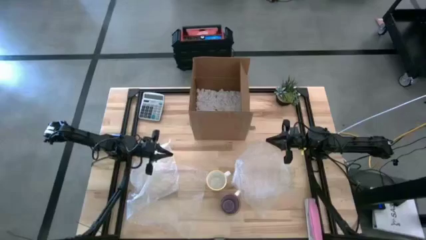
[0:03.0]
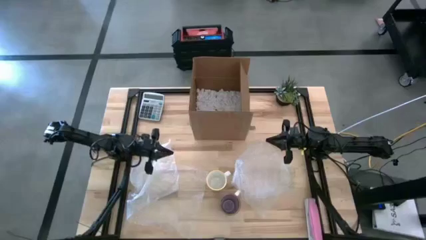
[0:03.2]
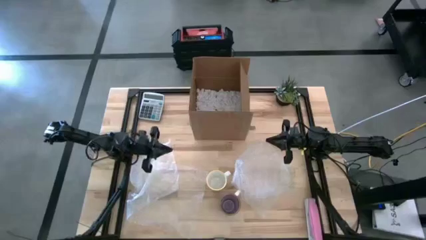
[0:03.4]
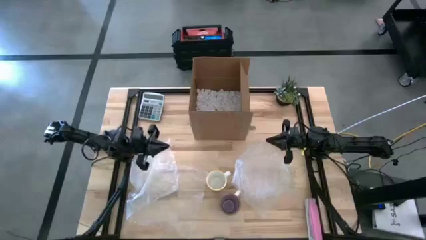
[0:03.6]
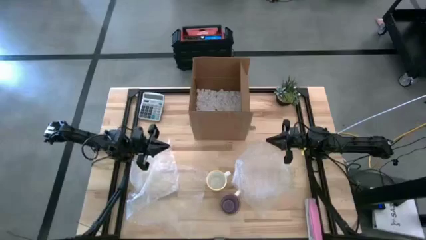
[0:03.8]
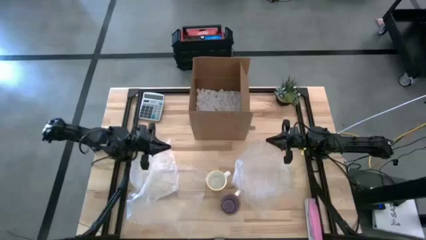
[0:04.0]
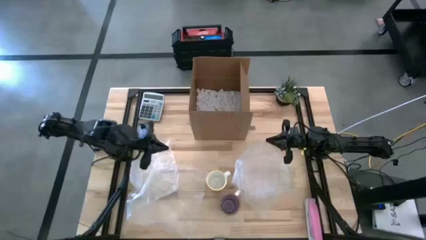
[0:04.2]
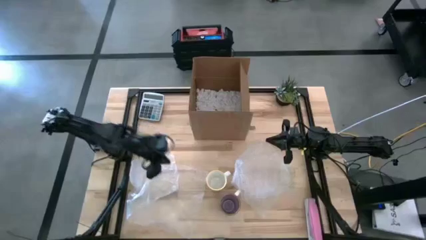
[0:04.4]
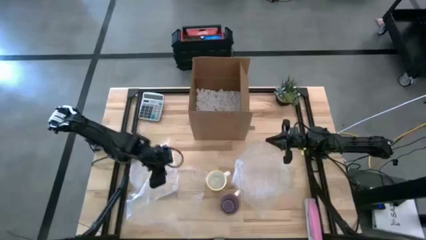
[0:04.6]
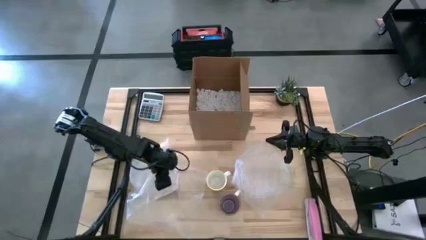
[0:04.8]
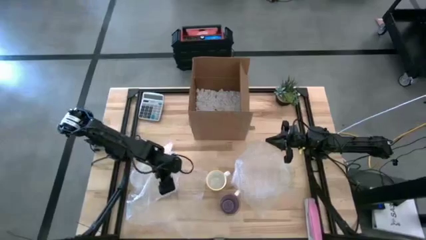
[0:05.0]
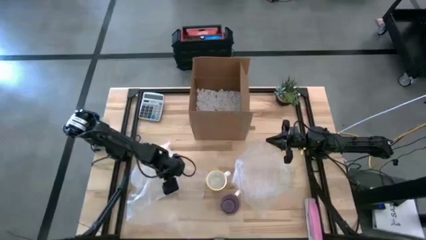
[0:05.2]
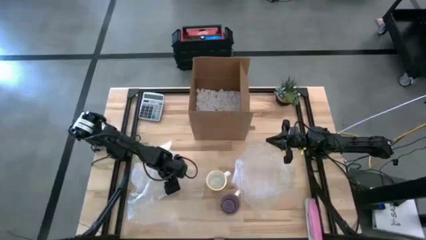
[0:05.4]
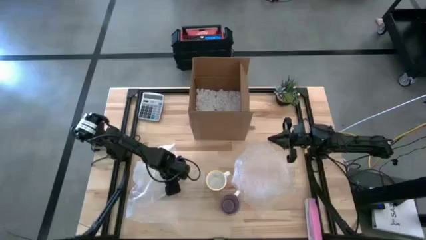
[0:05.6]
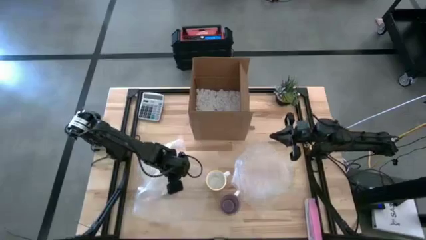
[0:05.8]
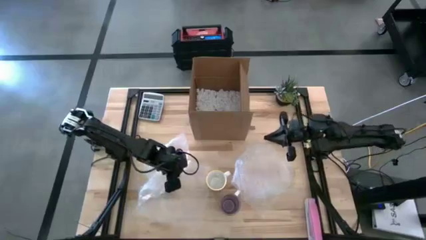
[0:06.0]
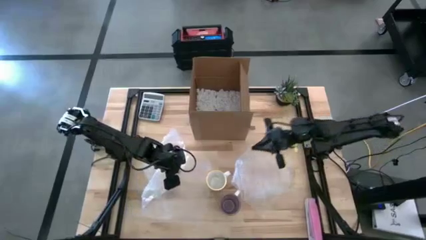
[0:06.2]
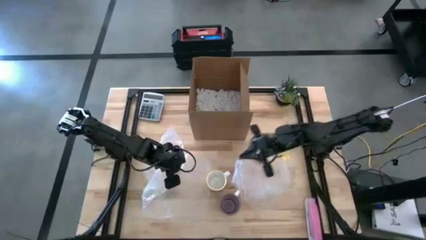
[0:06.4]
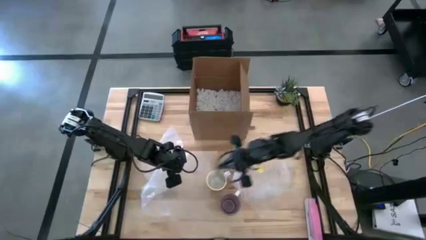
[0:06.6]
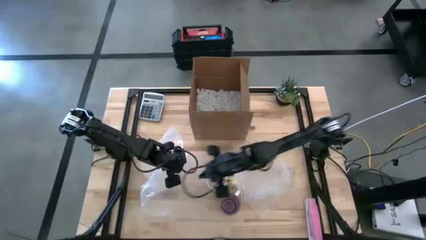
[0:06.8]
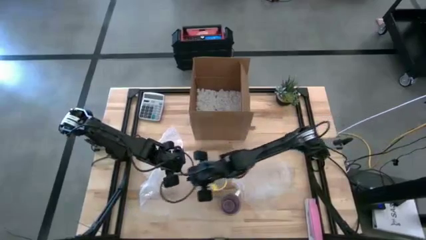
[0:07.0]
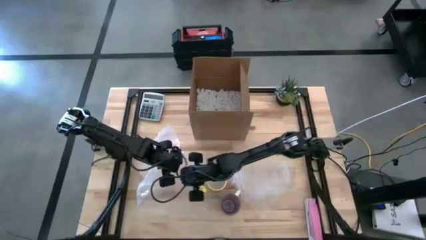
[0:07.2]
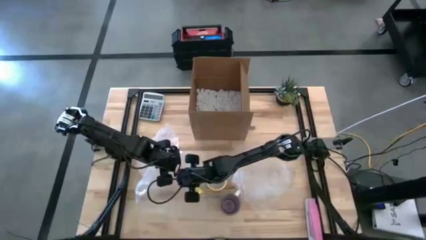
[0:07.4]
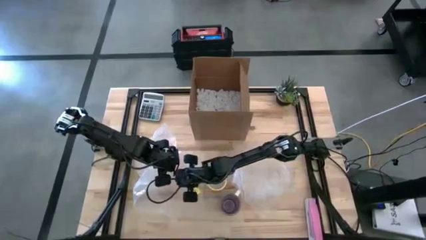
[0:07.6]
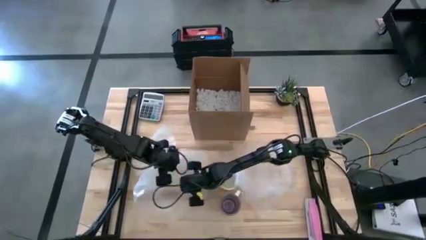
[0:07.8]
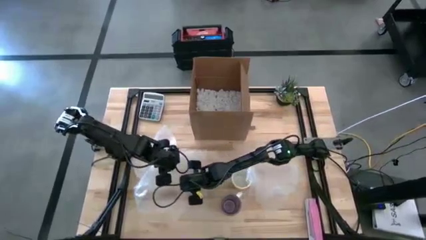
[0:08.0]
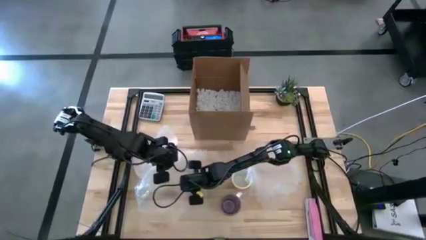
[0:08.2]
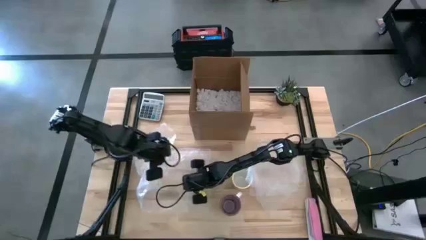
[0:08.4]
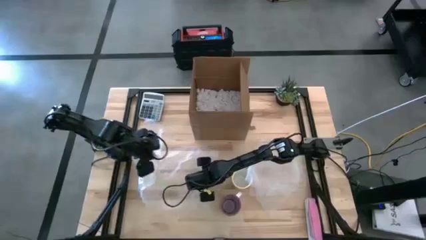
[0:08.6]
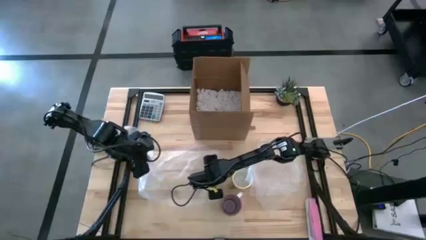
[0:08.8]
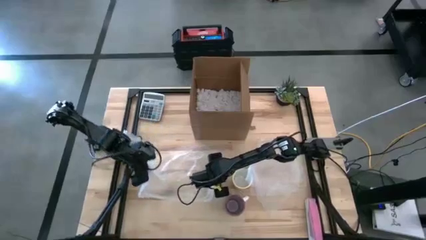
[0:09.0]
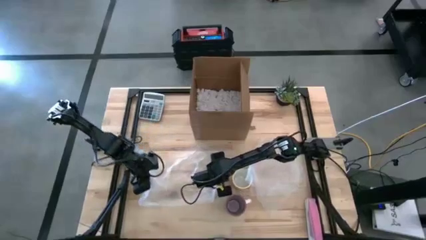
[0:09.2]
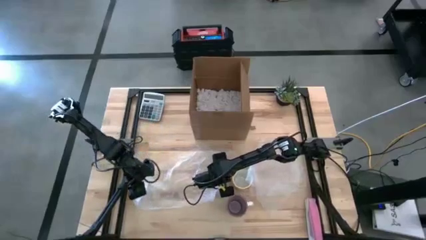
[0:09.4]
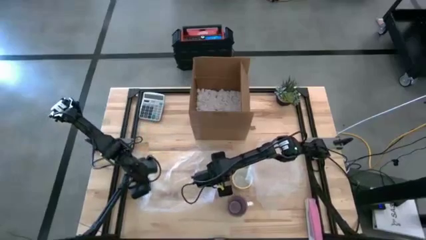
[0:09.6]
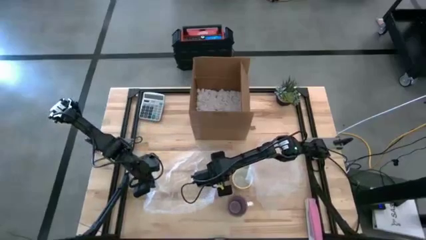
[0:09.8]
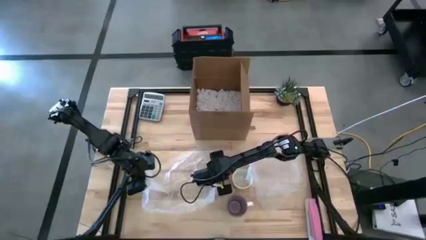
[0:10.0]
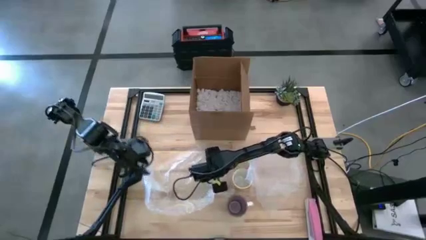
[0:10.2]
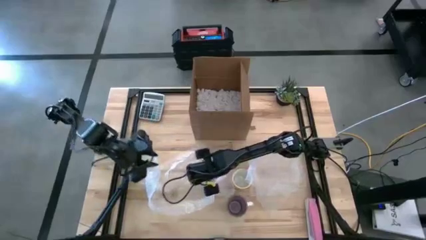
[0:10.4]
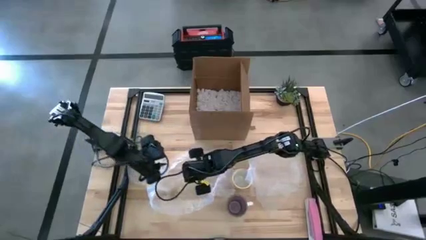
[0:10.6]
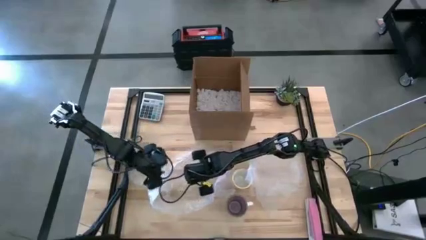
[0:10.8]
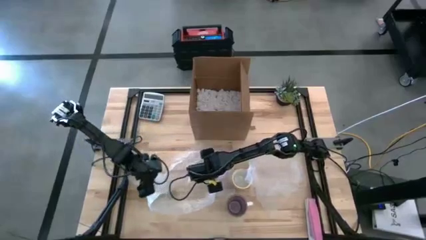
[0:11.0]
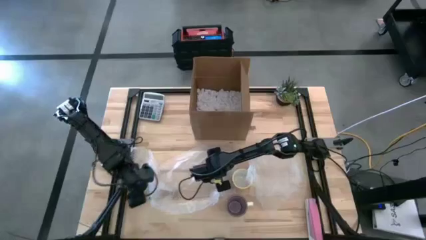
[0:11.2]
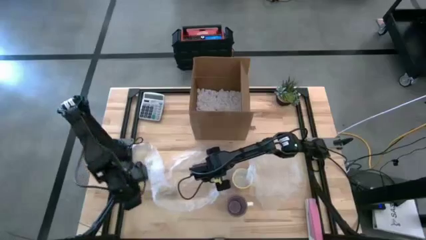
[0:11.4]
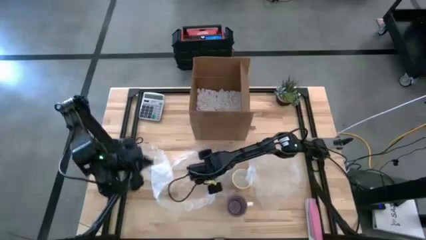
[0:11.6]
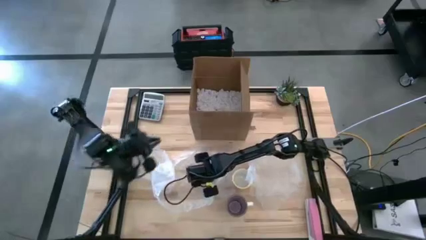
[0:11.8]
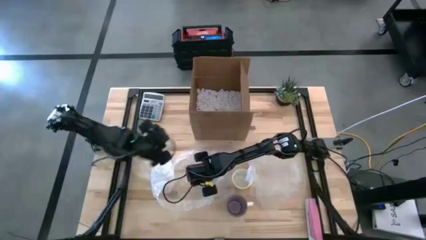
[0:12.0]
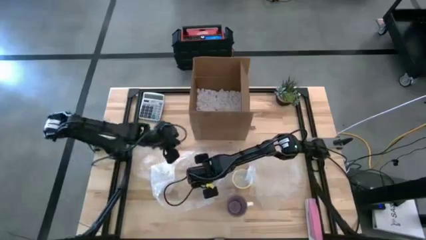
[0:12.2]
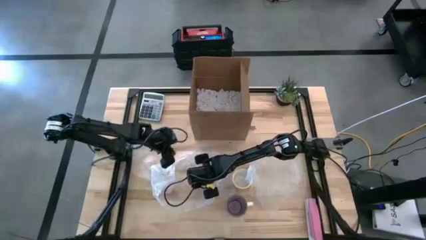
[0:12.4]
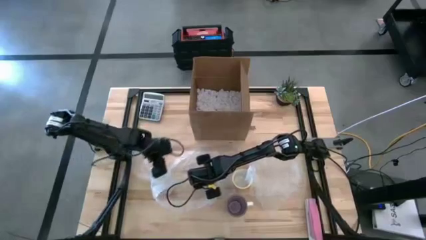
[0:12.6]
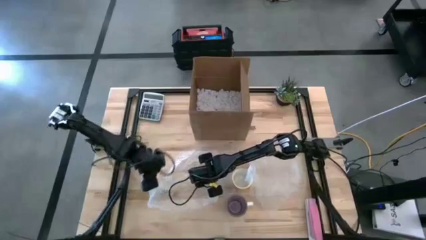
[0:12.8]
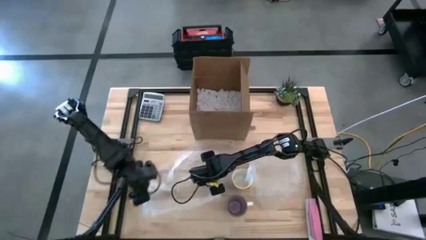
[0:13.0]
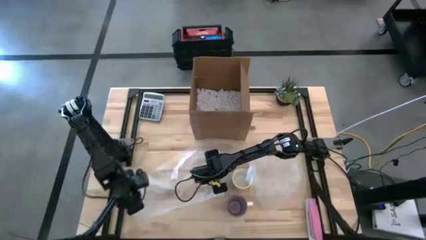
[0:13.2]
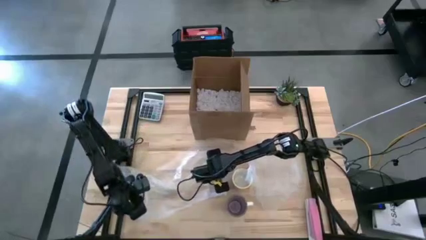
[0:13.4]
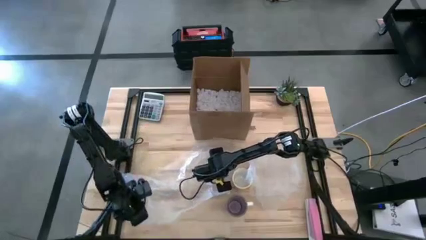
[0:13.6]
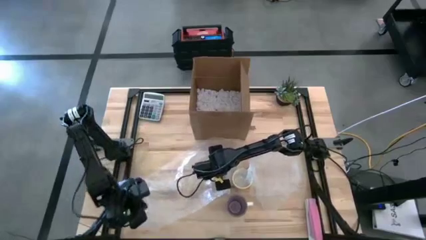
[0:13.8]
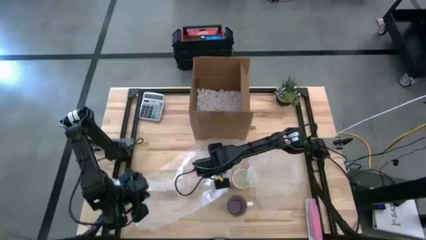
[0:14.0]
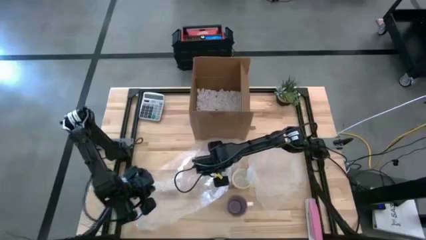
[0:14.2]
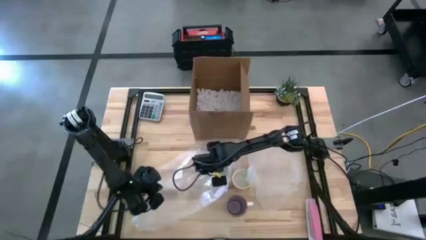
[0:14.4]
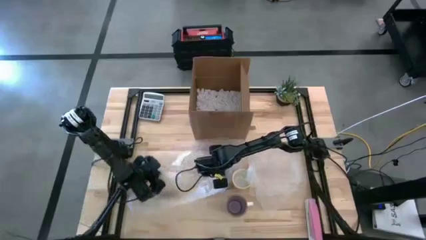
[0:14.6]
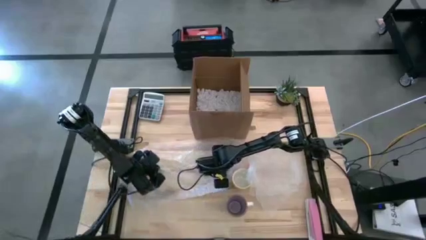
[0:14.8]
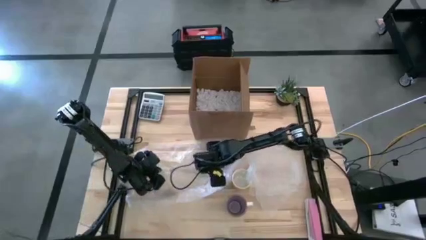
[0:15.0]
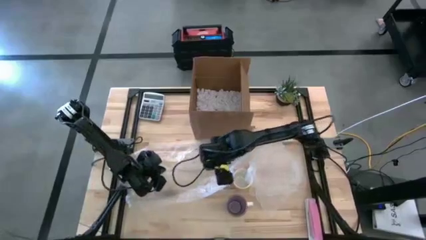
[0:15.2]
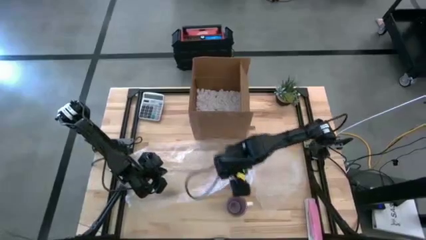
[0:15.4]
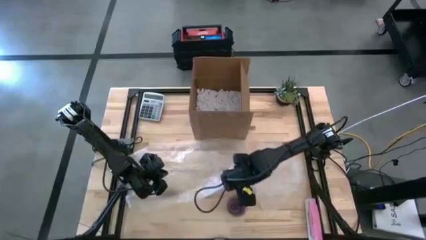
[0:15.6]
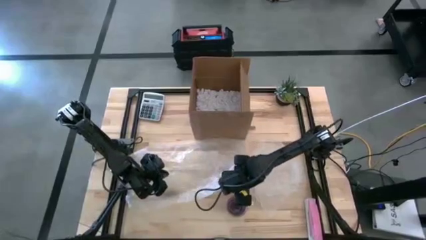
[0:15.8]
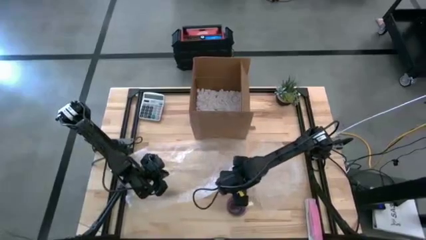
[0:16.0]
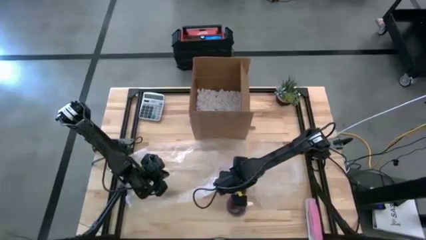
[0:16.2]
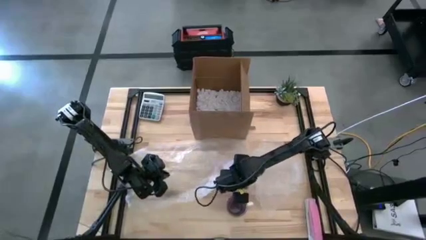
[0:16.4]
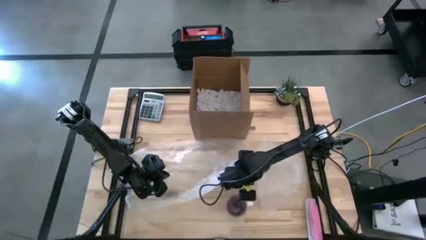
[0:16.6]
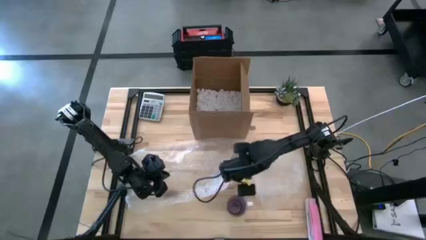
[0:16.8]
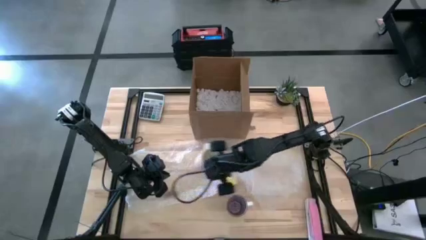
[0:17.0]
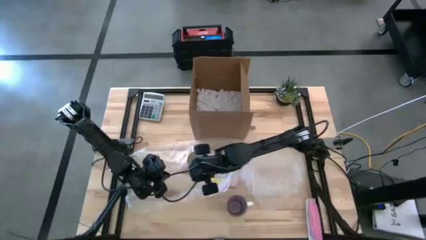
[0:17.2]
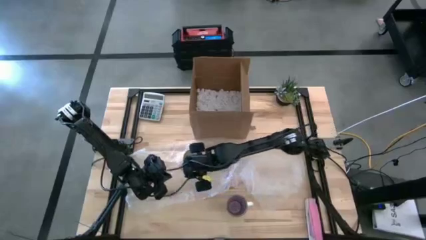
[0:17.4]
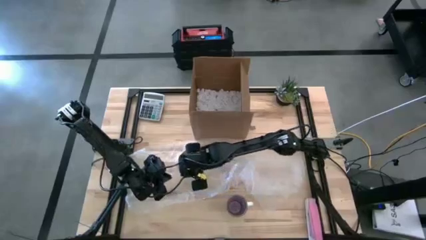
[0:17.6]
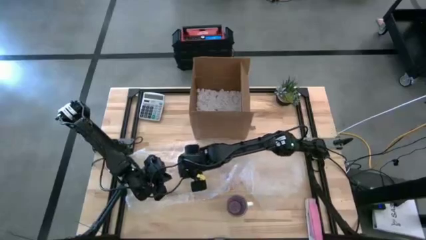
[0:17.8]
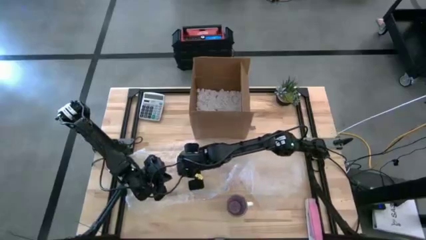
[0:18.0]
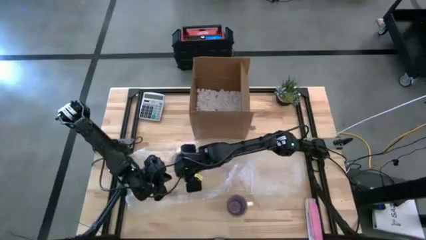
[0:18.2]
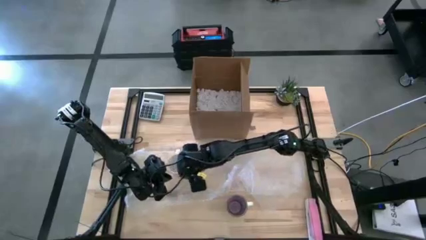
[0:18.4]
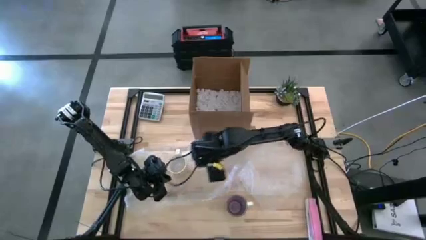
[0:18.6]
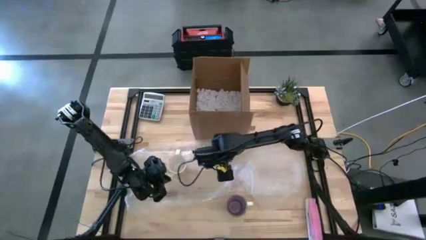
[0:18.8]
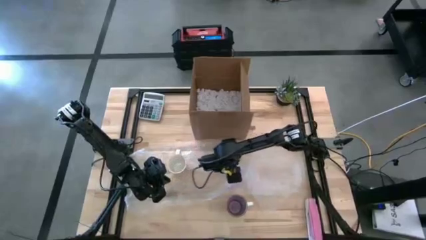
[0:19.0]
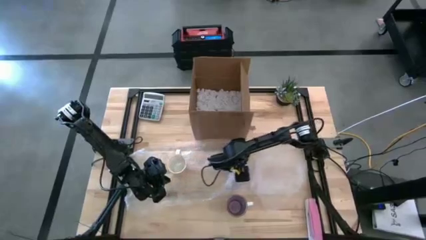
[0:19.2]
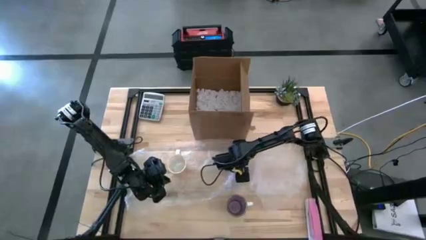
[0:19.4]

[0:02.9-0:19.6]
Task: wrap mug
Wrap the yellow mug with bubble wrap
